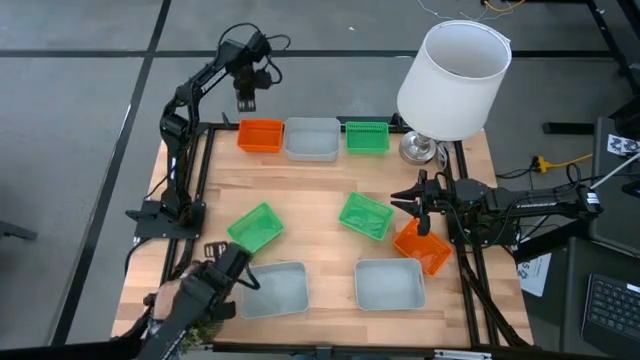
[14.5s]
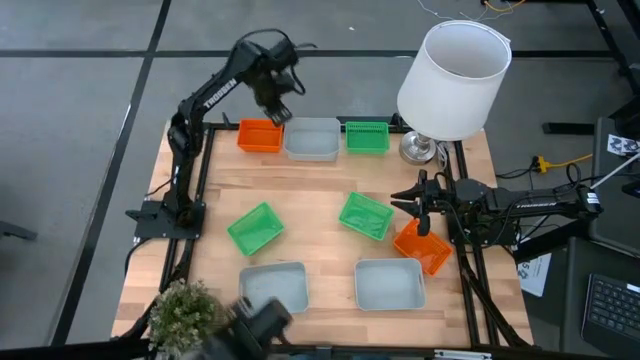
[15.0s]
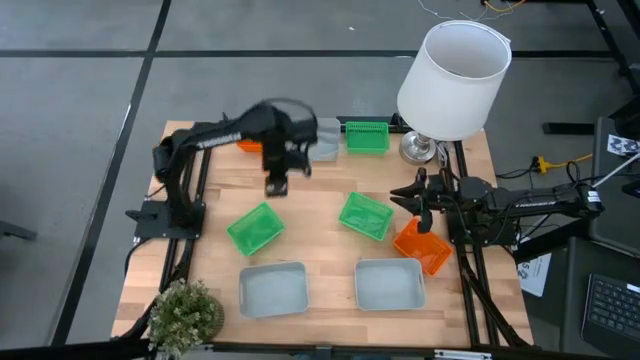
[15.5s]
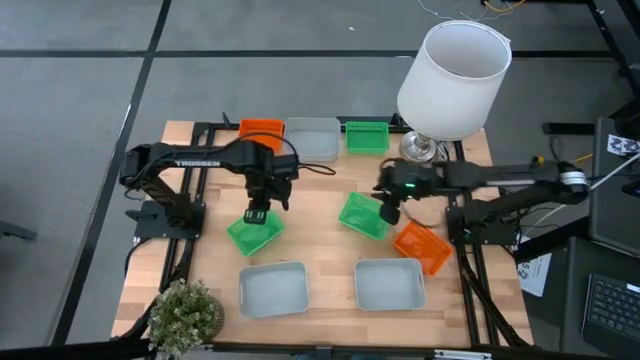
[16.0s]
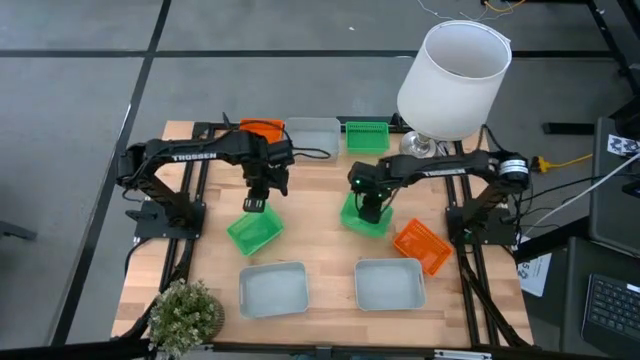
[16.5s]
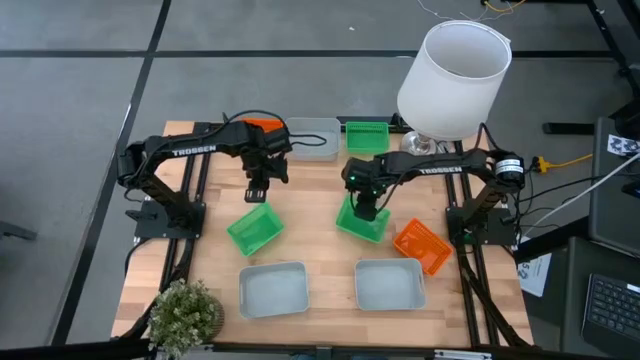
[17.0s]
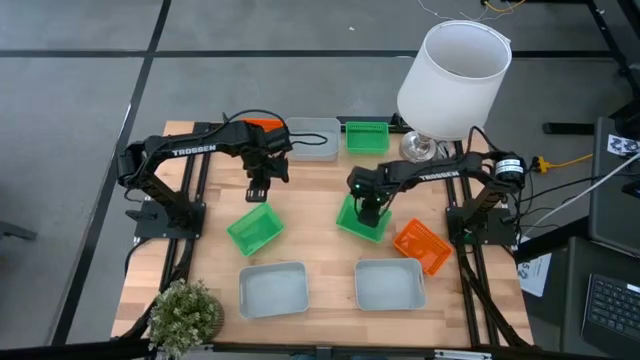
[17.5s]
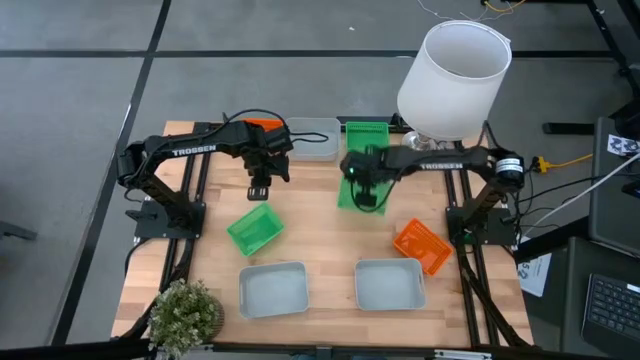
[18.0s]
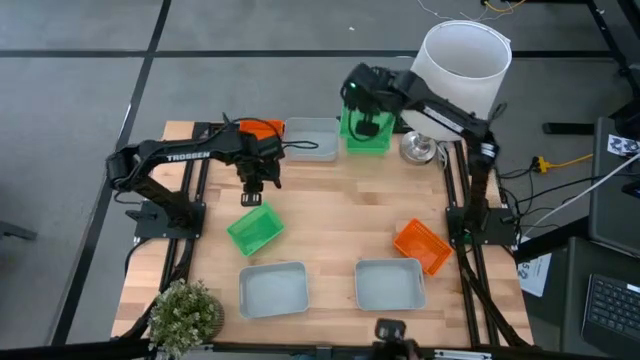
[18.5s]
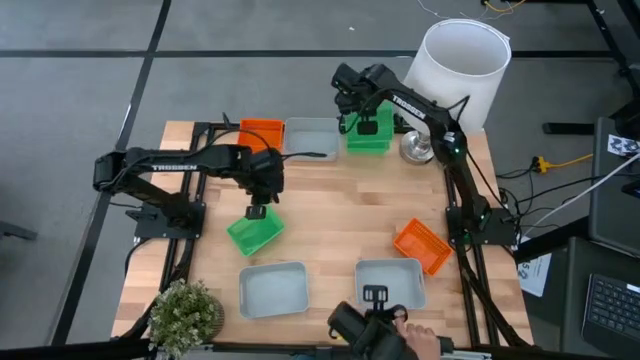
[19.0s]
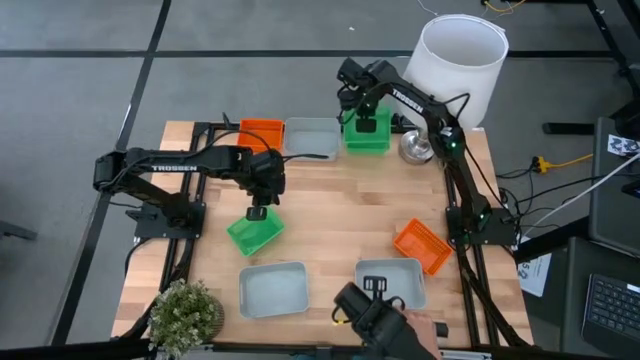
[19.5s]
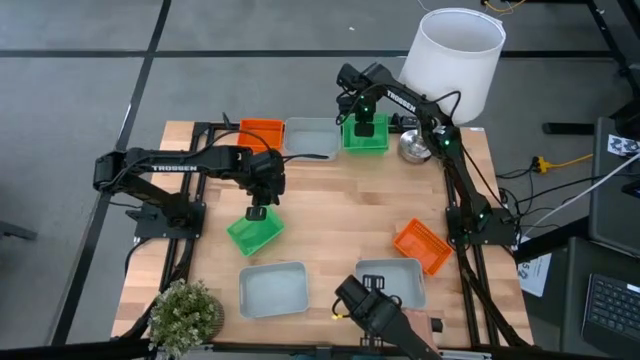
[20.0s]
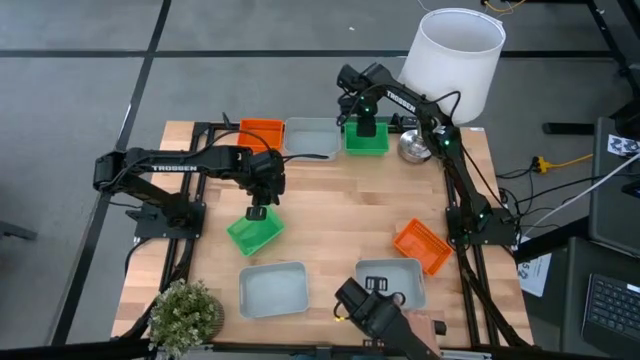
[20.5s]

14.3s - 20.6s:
Stack the bottom right green bin on the top green bin

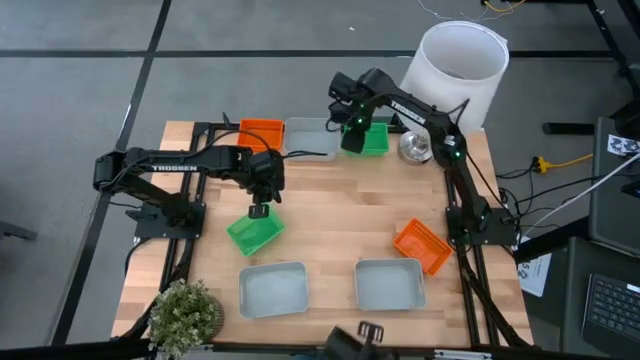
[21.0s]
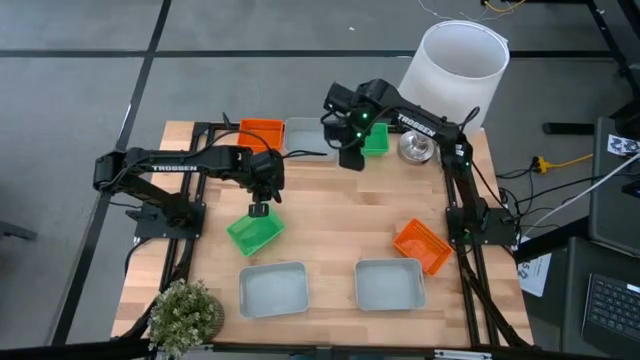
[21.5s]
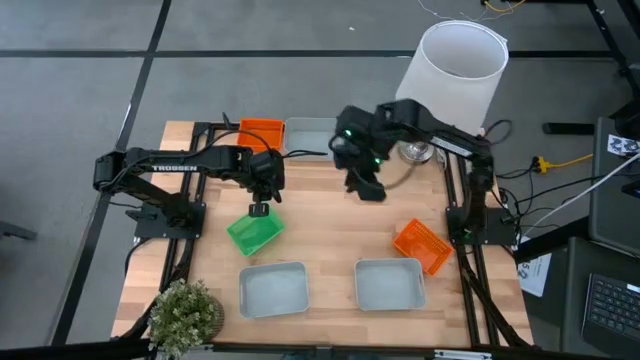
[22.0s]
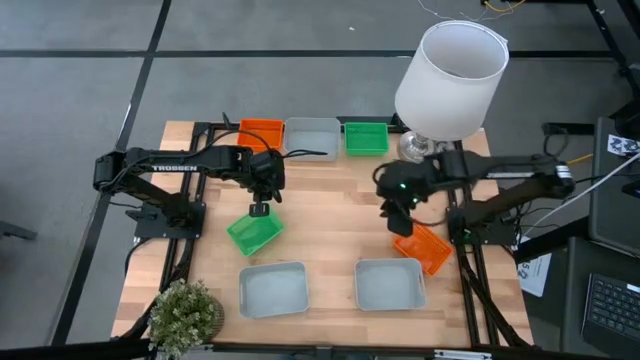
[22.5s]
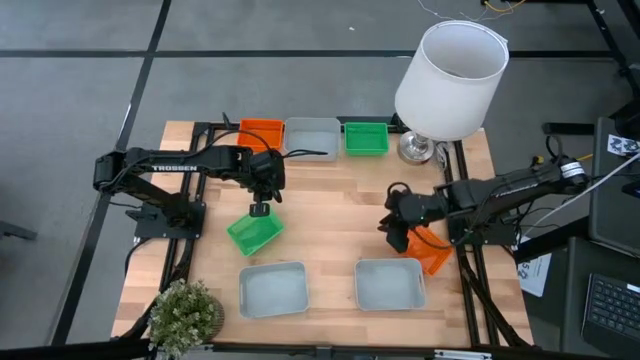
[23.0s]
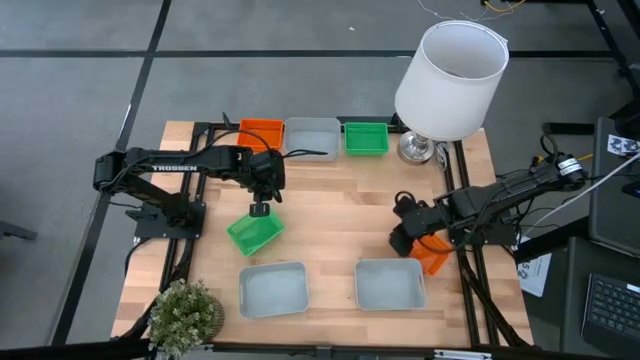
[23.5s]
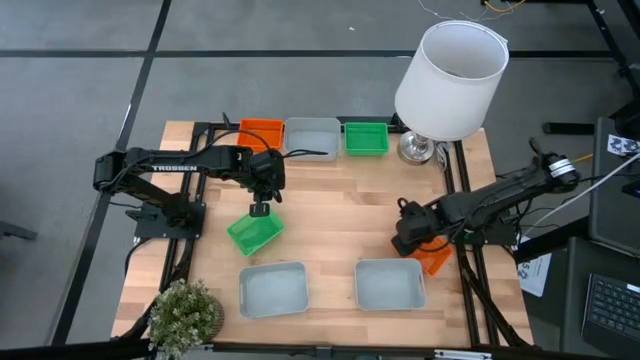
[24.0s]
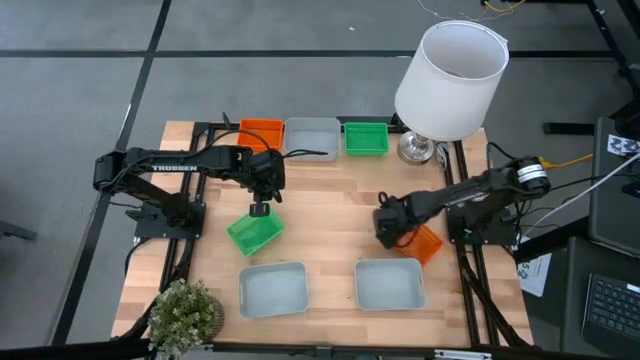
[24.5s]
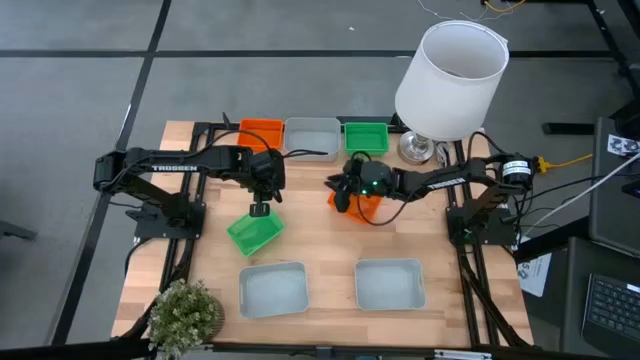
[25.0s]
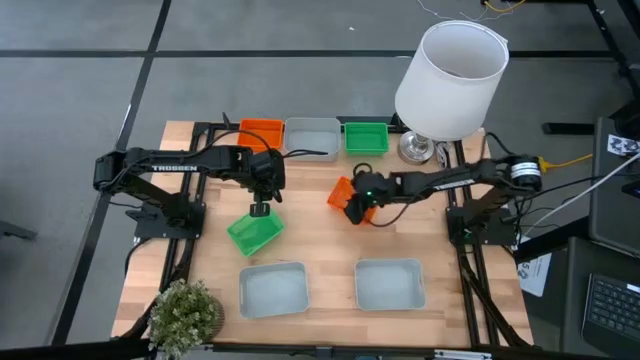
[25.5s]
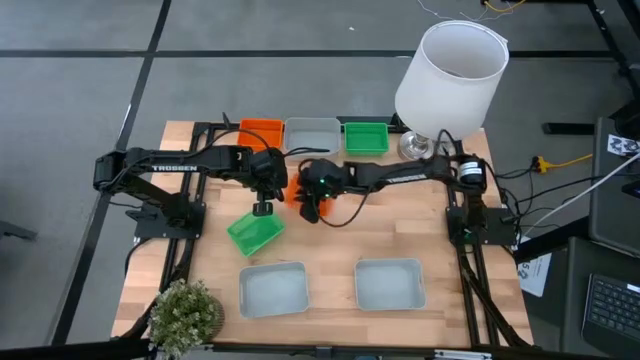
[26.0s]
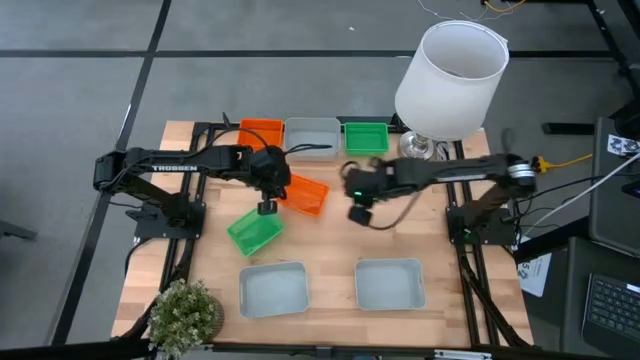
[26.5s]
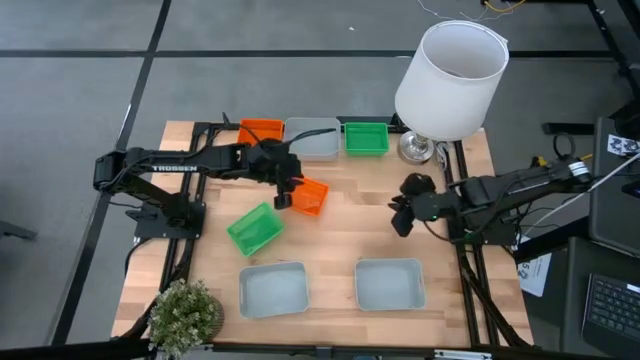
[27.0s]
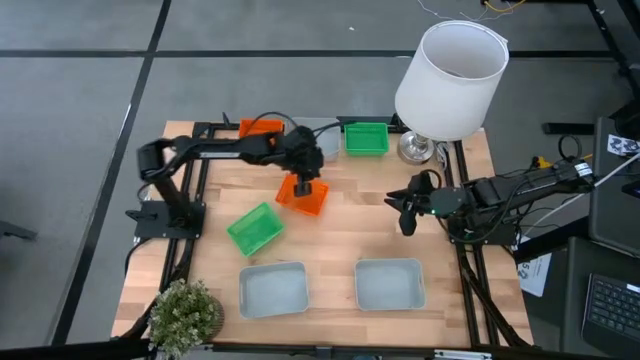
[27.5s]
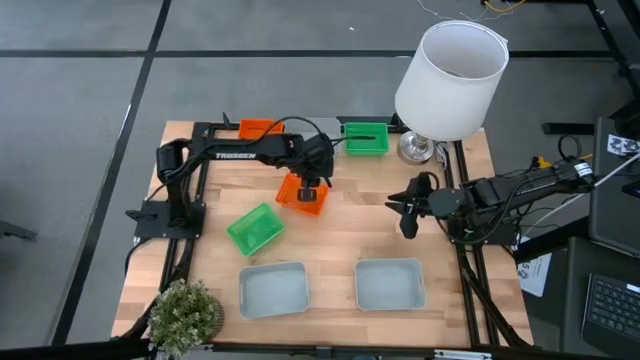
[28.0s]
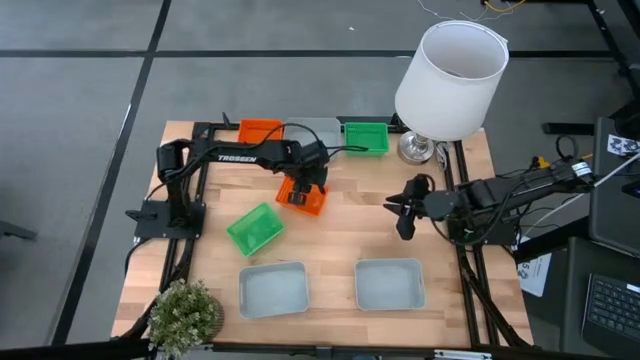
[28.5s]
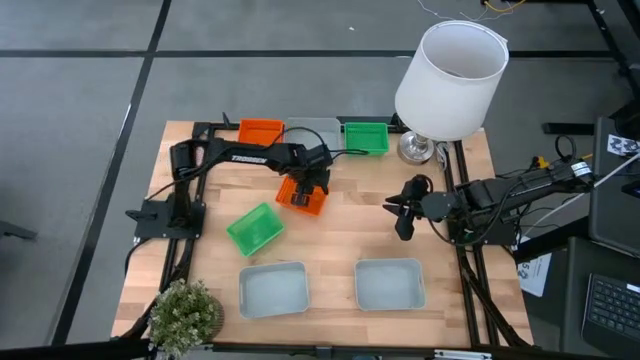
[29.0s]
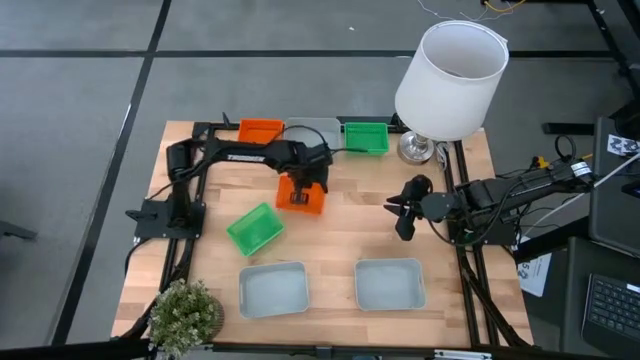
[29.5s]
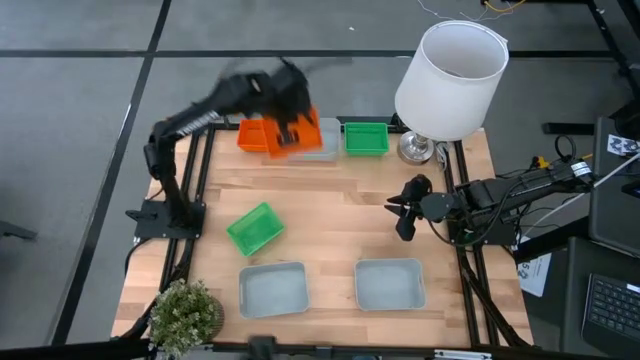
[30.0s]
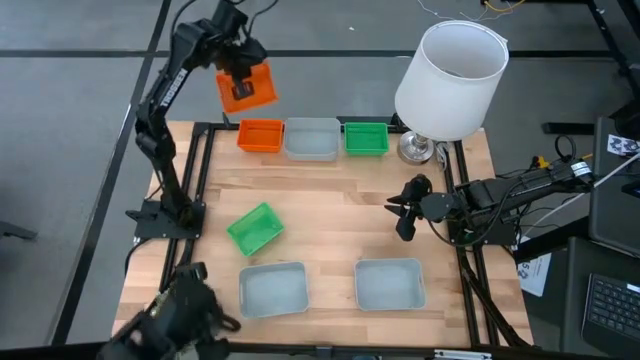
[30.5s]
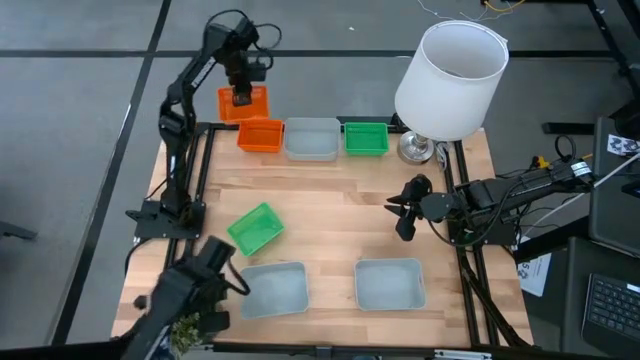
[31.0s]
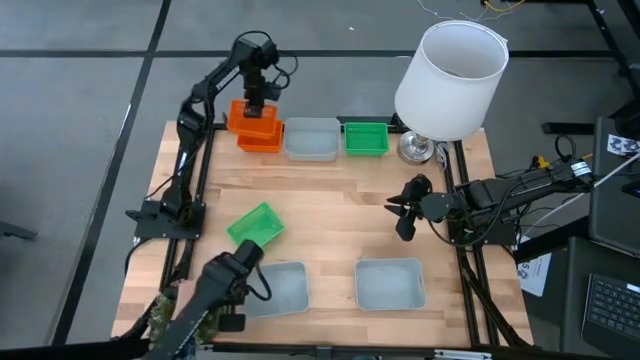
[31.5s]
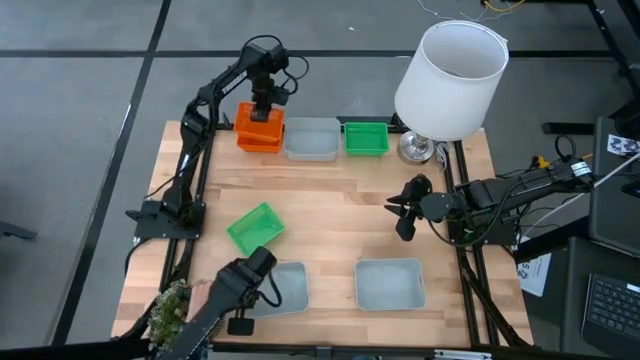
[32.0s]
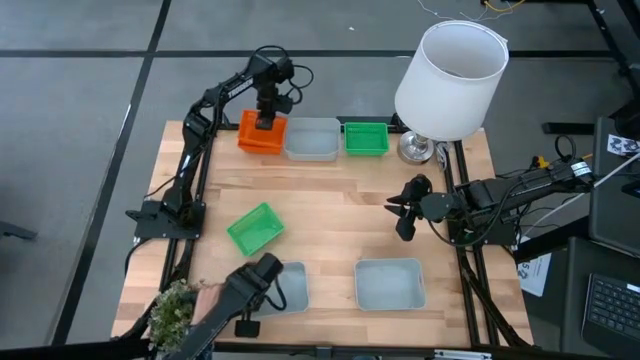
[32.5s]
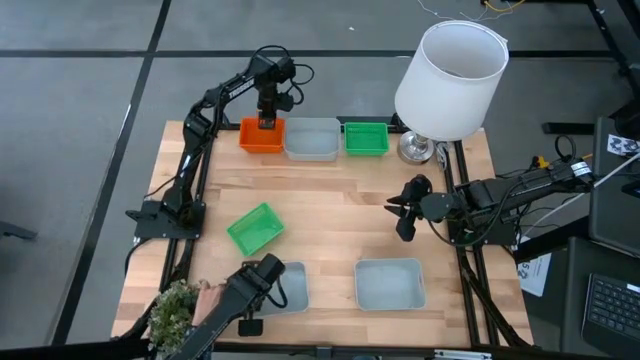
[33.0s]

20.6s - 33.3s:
Stack the bottom orange bin on the orange bin
